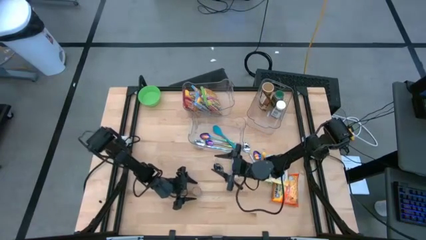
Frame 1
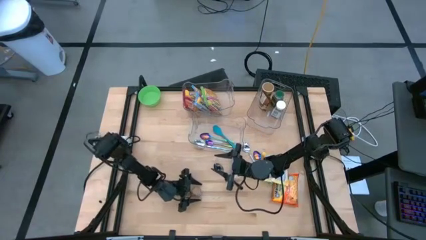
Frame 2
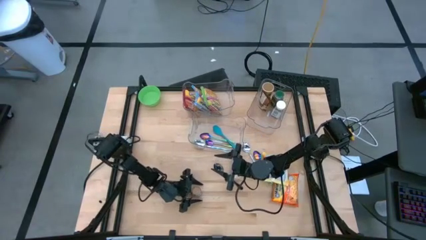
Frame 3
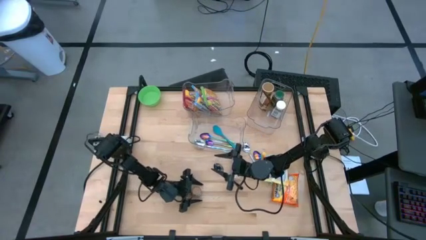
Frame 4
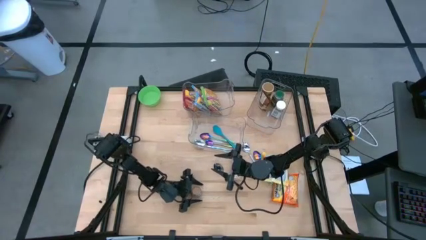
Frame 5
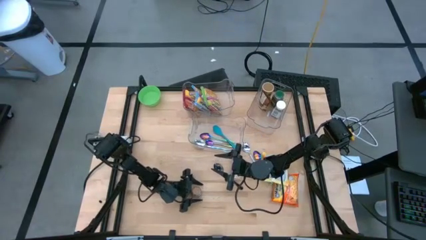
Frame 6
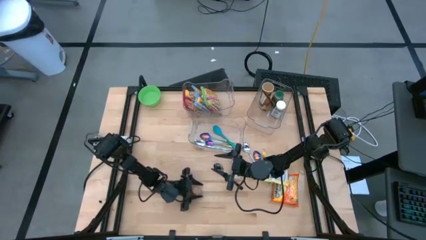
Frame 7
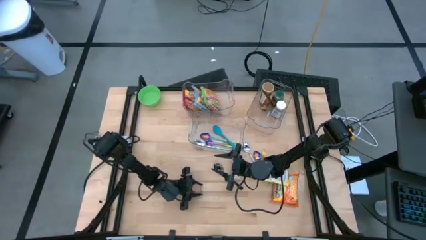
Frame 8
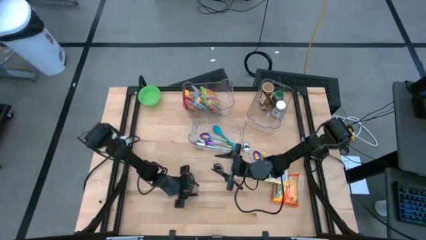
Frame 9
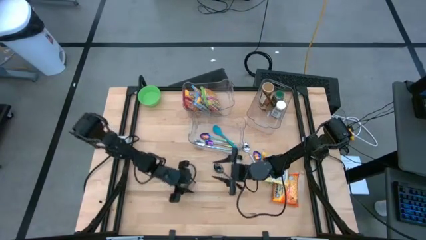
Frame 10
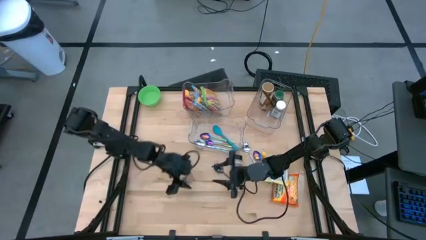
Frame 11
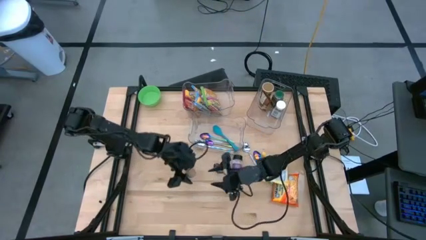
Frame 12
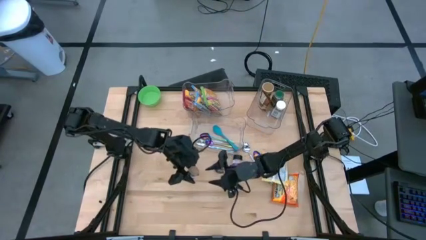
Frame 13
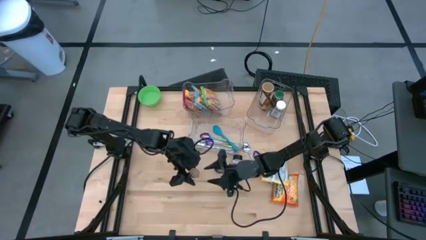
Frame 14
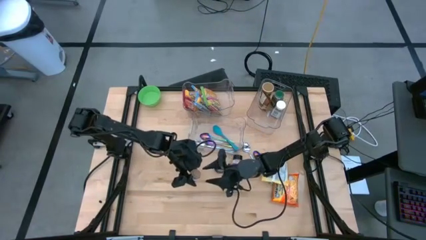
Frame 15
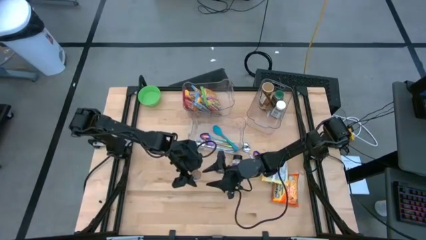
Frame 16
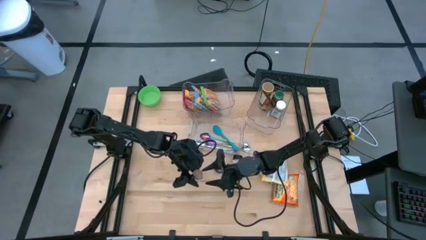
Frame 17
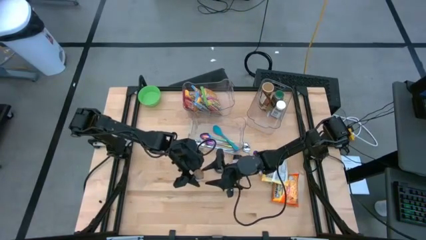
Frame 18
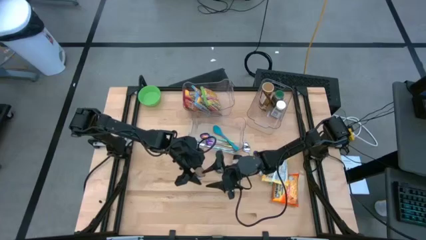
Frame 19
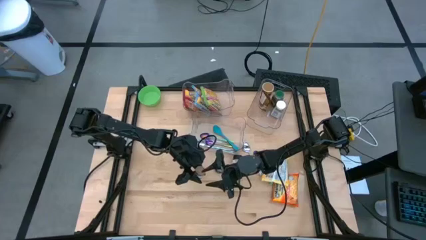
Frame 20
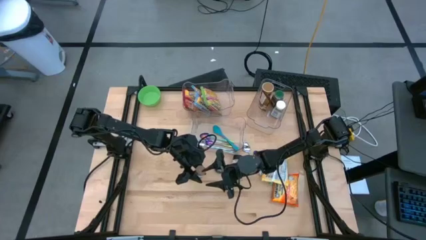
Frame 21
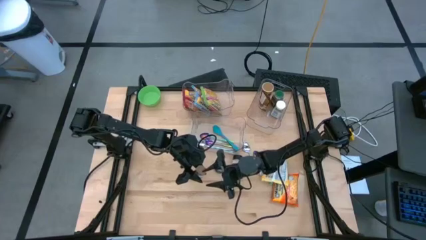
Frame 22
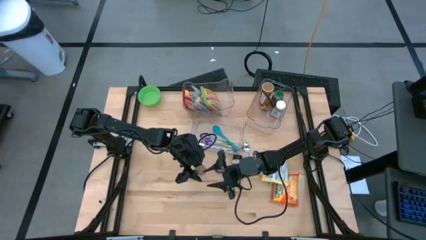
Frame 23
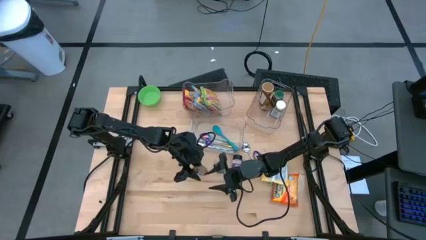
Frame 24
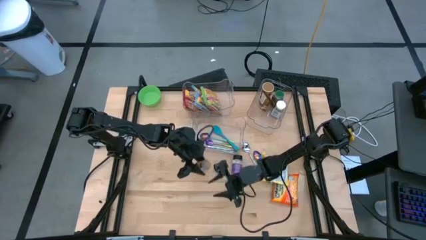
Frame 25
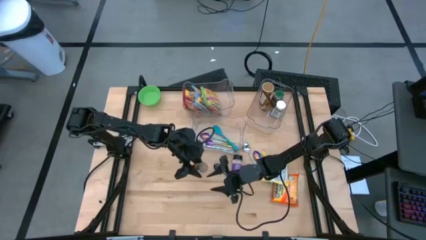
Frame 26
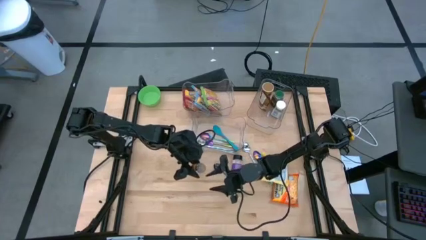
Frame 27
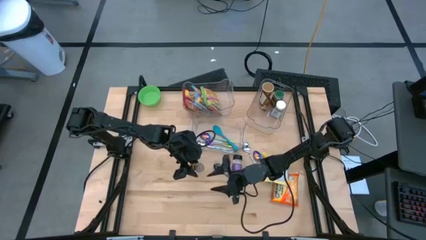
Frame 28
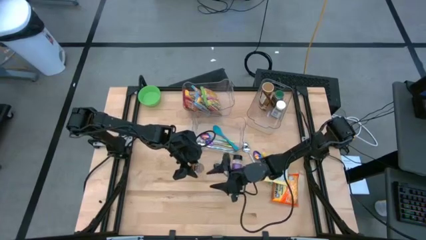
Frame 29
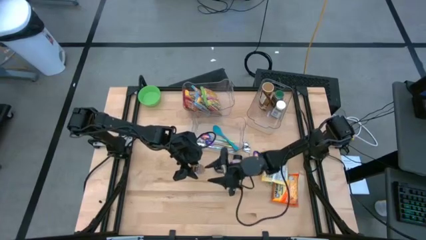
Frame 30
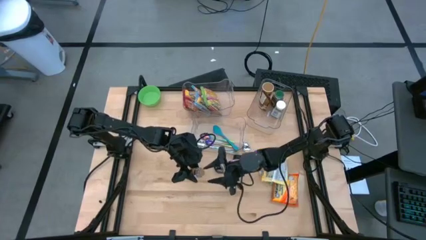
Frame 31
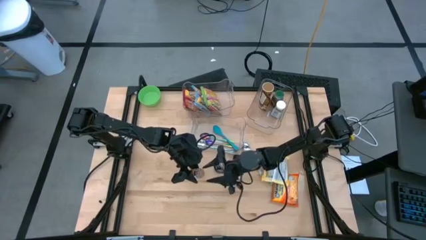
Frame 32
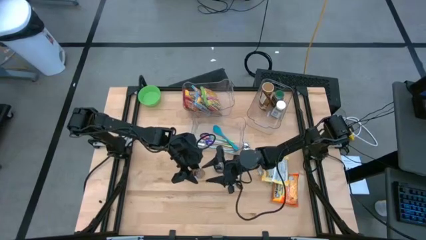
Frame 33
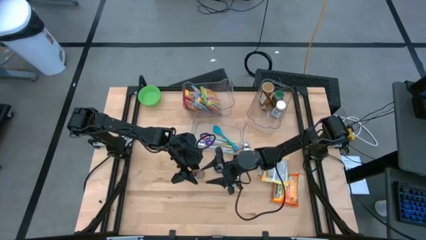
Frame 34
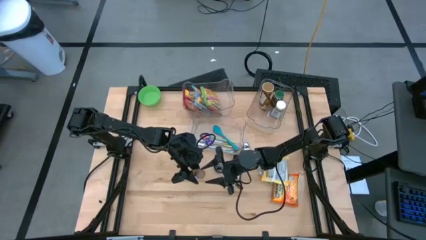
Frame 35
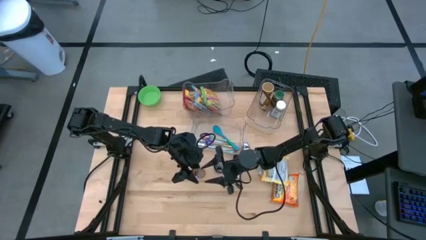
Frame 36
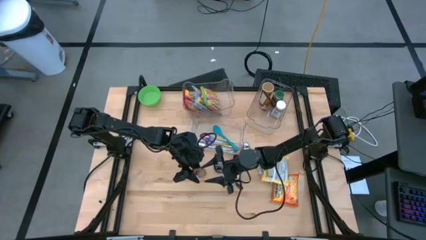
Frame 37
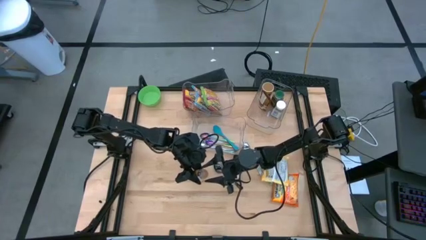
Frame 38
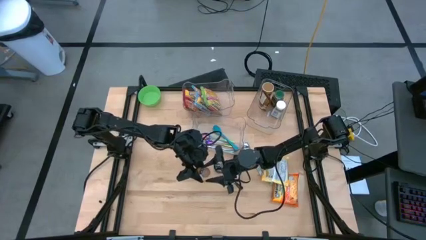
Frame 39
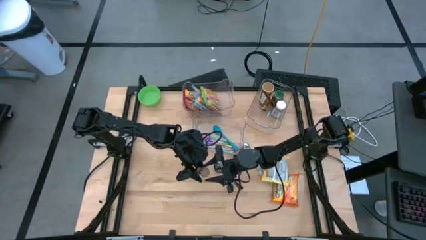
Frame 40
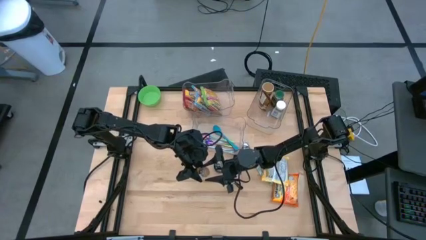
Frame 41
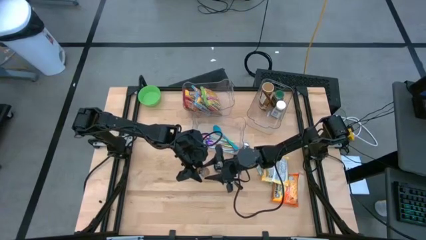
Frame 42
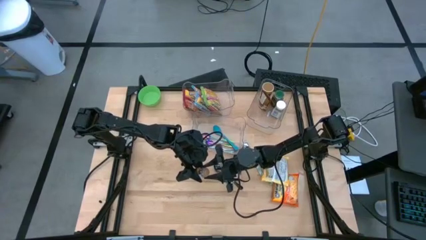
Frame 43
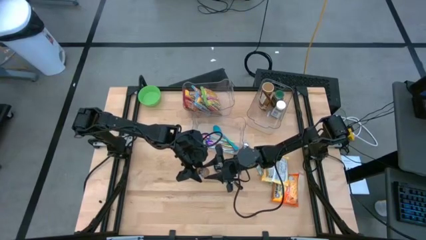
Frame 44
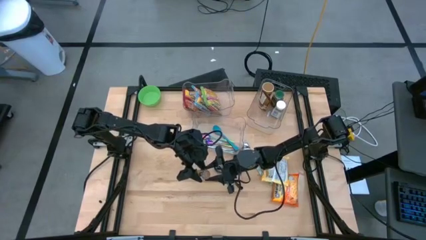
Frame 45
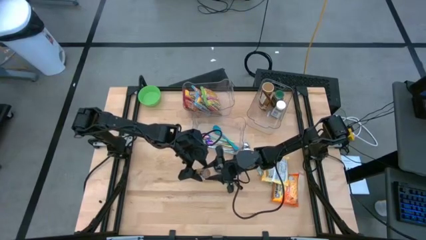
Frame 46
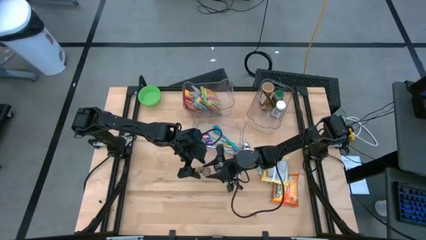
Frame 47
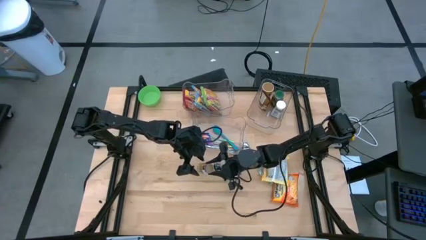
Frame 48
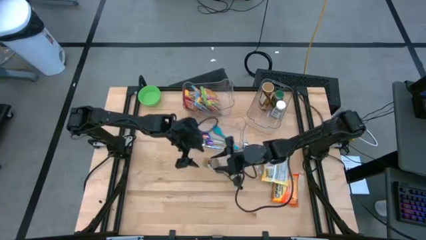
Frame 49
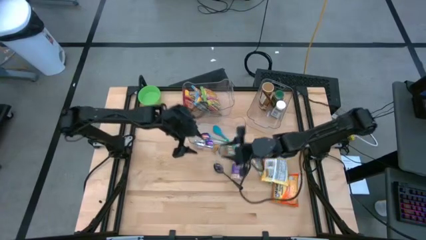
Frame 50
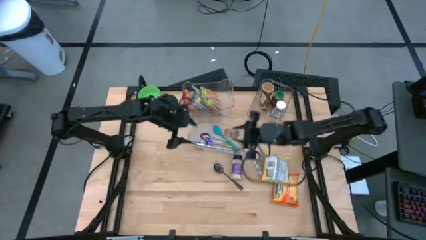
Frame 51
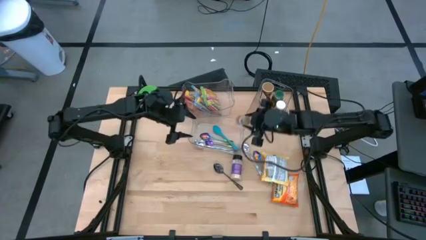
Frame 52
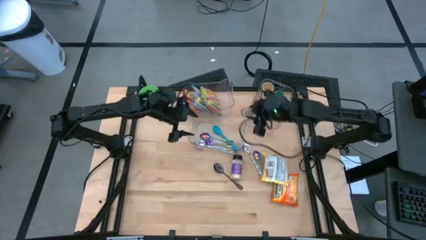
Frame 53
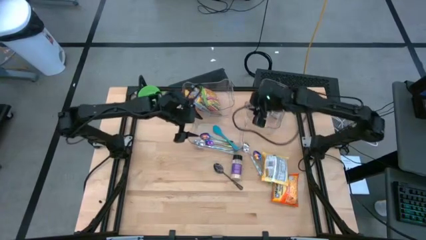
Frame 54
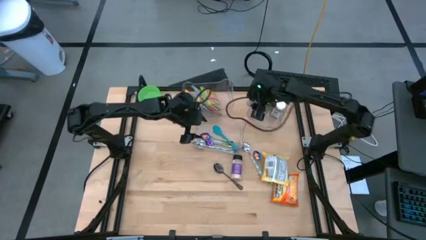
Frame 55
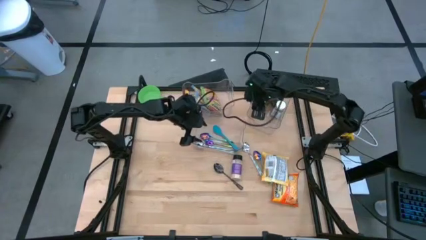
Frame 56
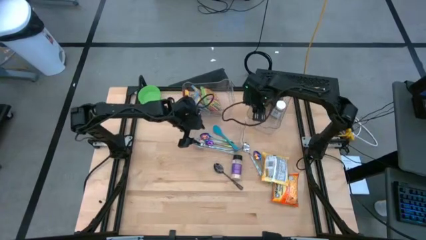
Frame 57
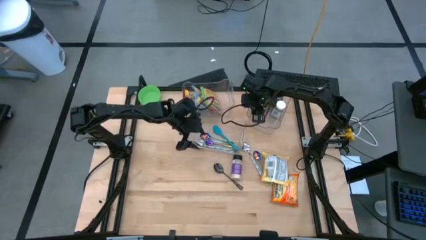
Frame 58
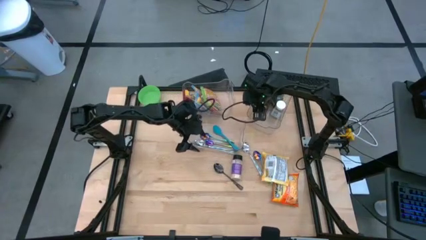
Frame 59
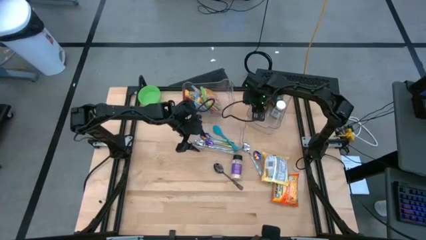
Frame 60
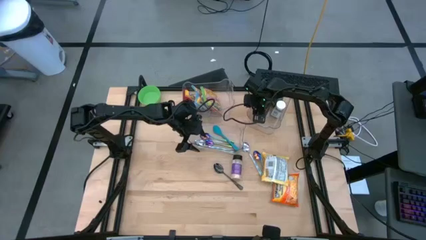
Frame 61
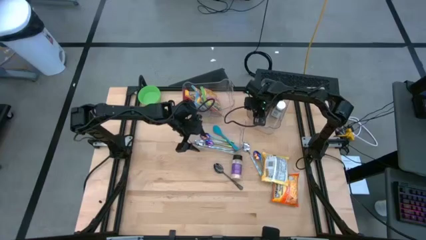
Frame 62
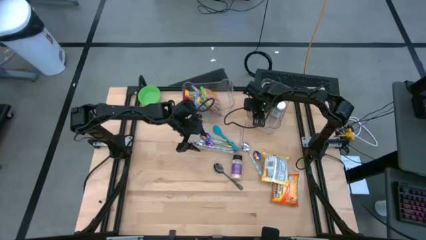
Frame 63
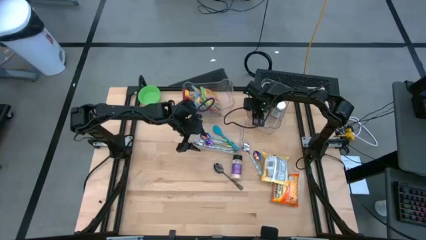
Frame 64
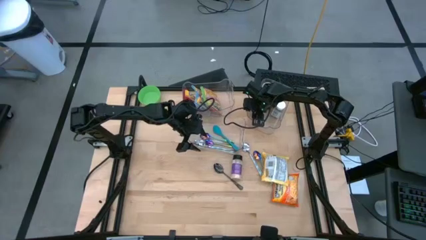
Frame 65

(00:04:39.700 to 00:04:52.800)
Task: Pick & Place Food Item
Put the brown seasoning bottle into the top right transparent bin
